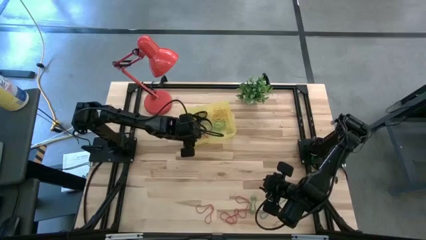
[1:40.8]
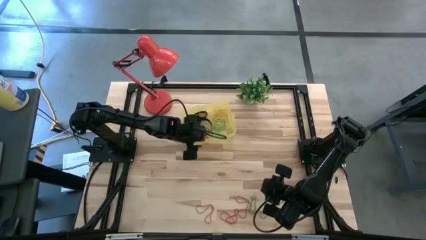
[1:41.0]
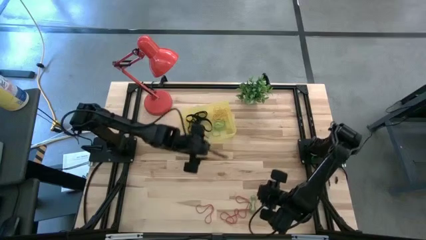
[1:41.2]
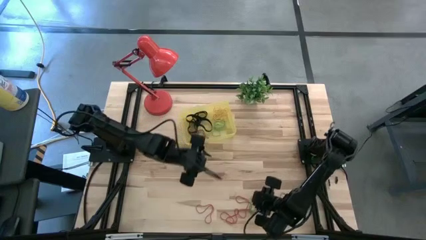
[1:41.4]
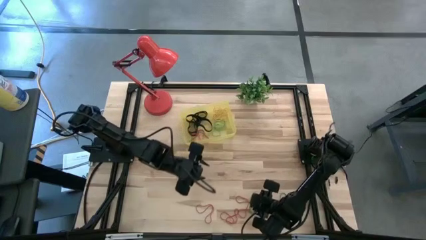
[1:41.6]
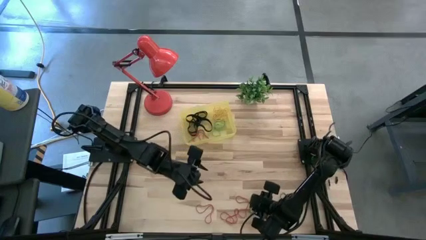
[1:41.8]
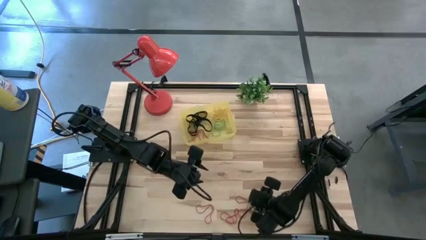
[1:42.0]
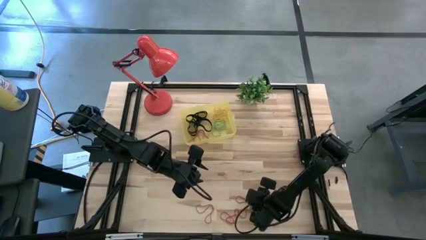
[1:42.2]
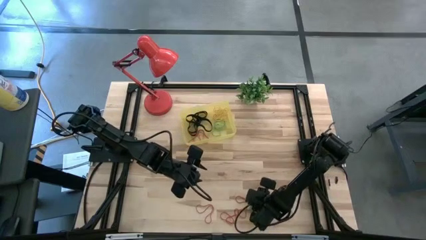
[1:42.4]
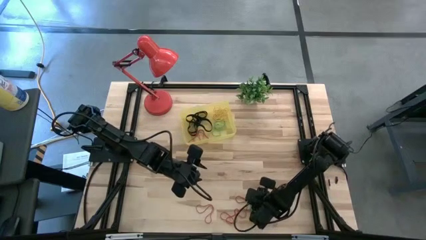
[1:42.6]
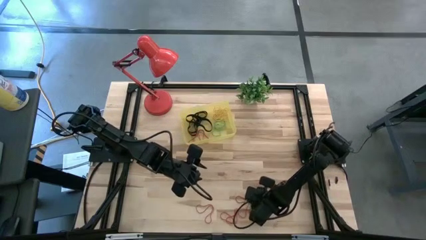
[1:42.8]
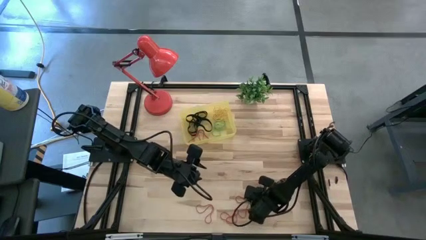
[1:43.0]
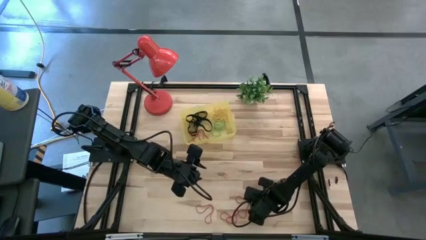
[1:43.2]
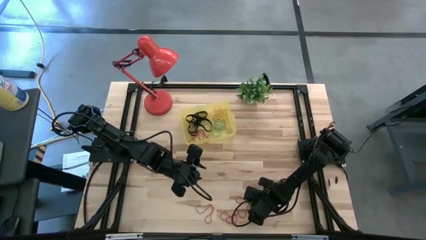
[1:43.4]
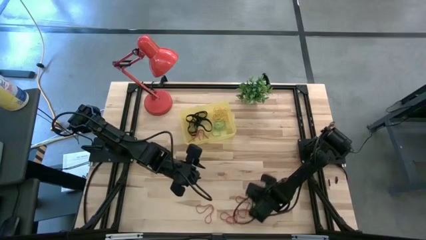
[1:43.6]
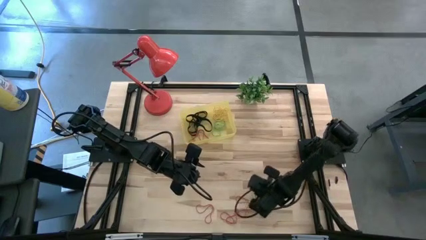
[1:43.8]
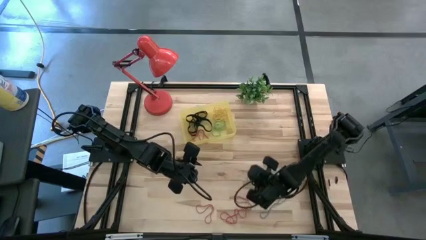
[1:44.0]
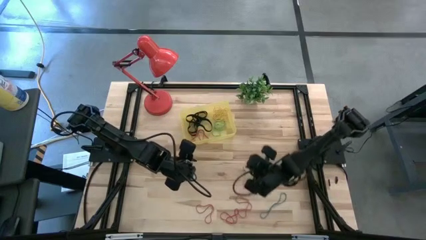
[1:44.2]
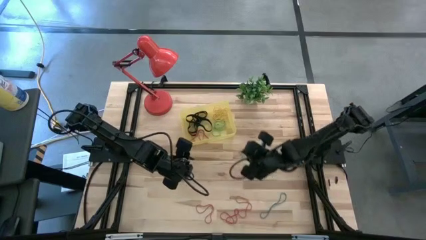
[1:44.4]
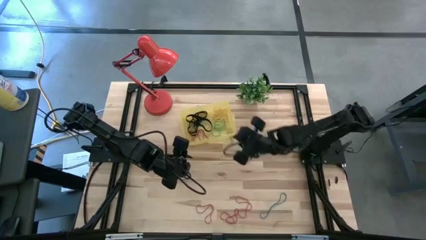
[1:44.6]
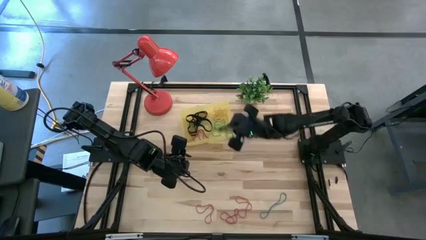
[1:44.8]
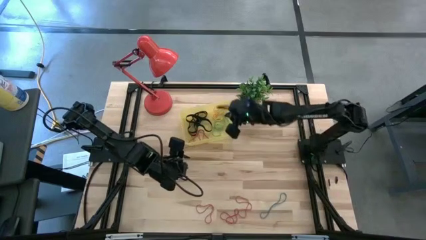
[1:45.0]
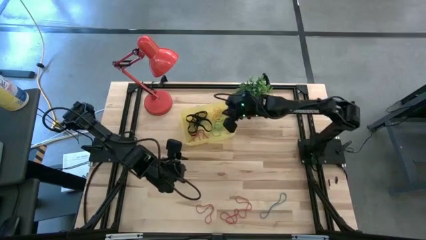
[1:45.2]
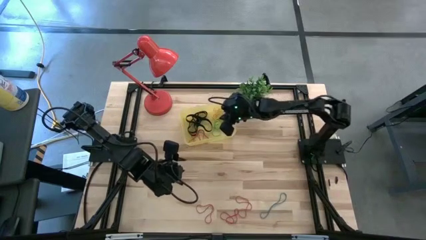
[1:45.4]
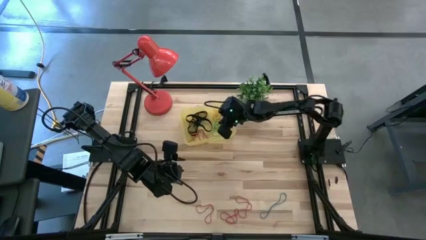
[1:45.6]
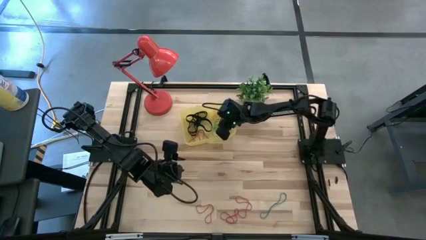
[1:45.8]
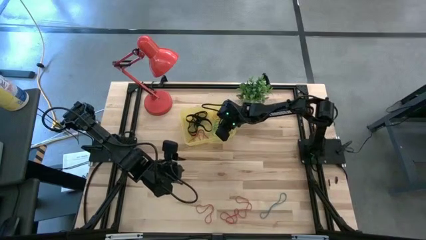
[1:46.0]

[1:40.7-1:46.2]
Task: Pick and place rubber bands into bin
Put the green rubber band into the yellow bin

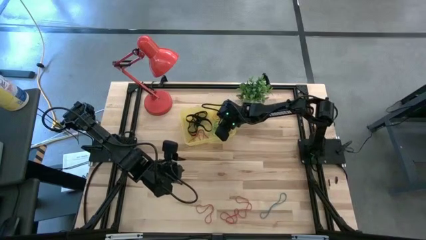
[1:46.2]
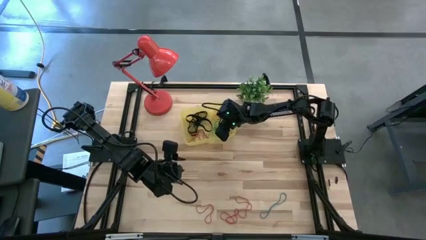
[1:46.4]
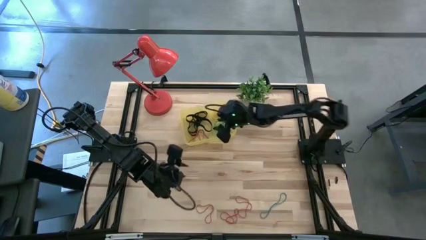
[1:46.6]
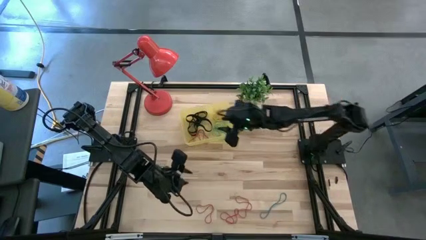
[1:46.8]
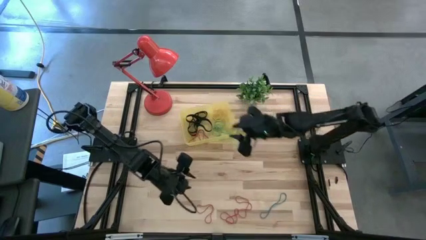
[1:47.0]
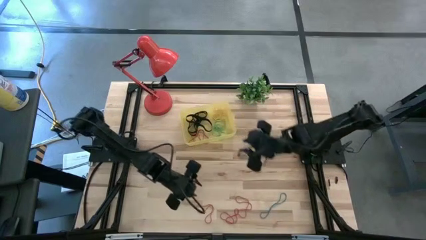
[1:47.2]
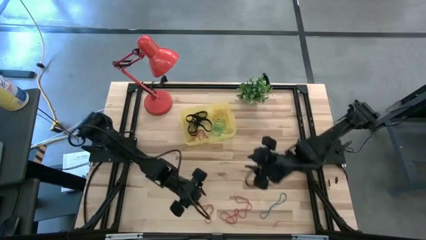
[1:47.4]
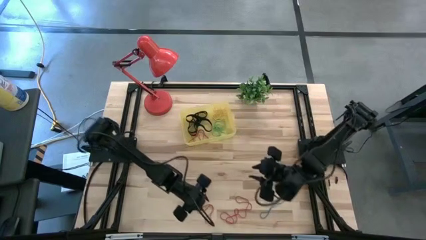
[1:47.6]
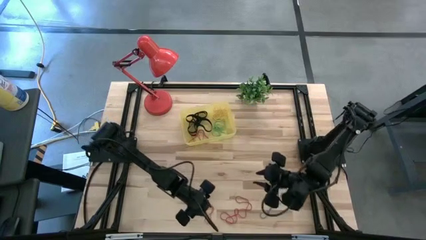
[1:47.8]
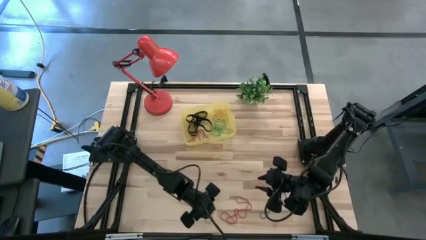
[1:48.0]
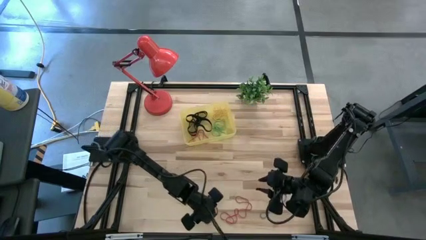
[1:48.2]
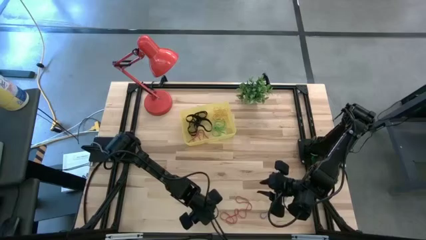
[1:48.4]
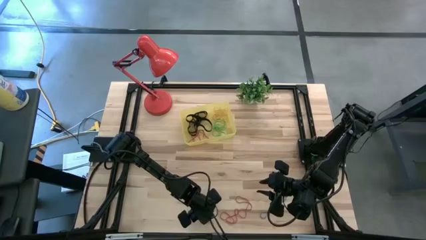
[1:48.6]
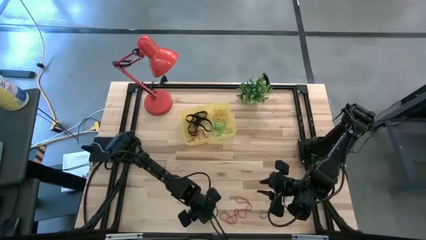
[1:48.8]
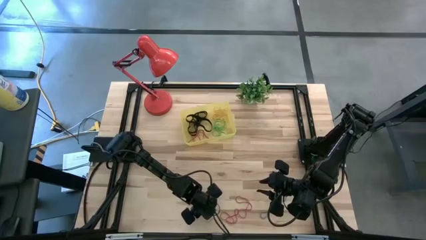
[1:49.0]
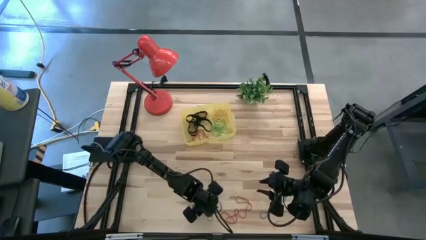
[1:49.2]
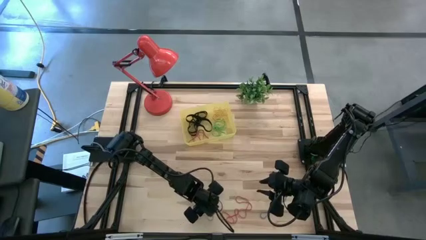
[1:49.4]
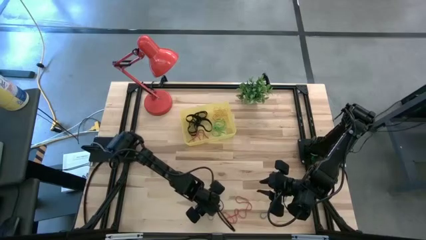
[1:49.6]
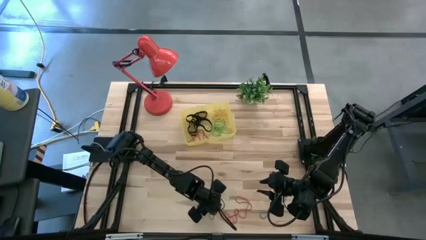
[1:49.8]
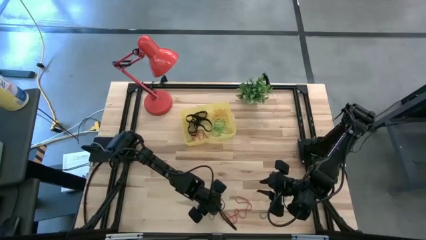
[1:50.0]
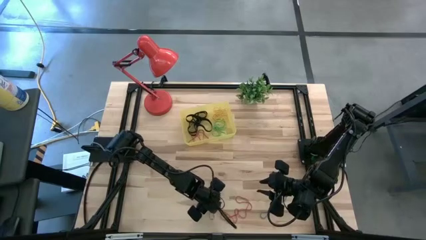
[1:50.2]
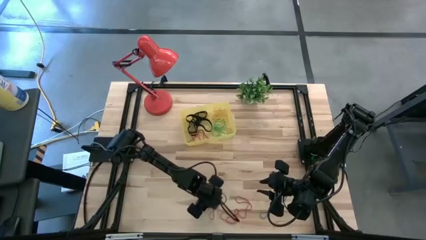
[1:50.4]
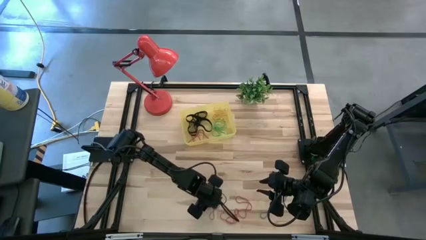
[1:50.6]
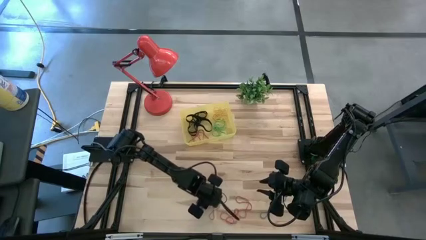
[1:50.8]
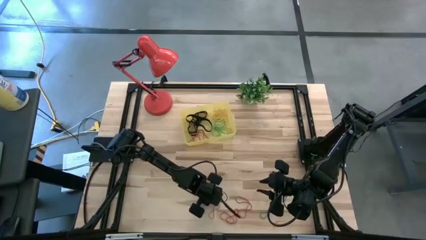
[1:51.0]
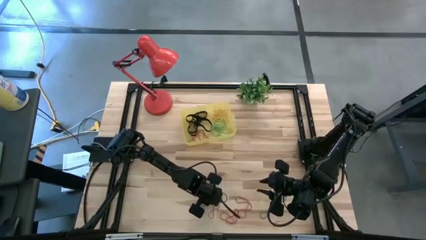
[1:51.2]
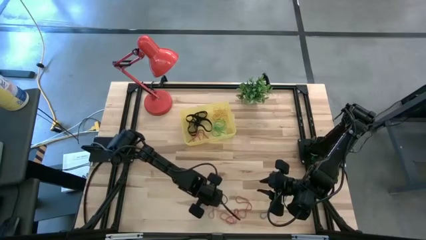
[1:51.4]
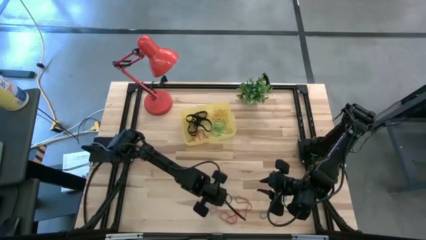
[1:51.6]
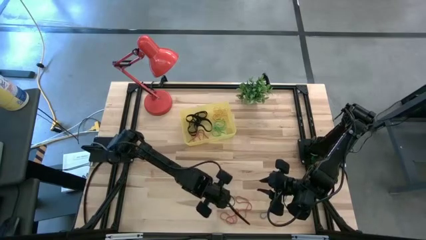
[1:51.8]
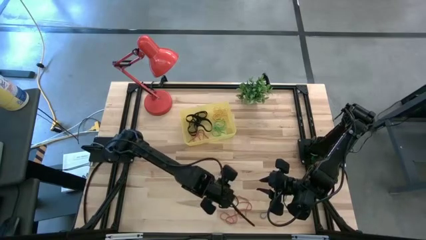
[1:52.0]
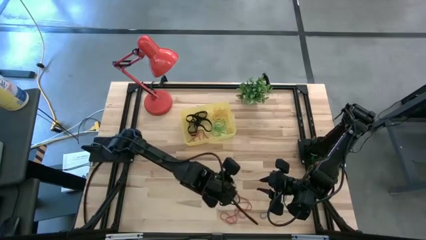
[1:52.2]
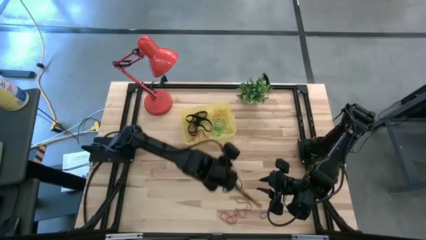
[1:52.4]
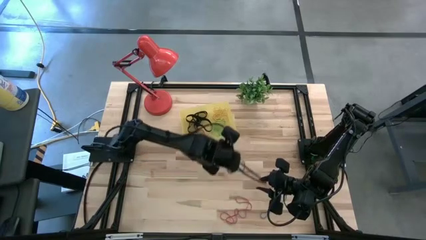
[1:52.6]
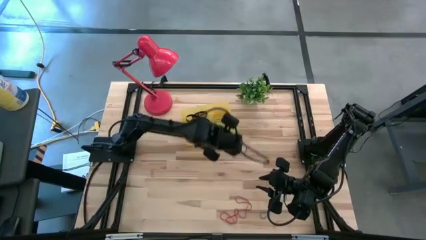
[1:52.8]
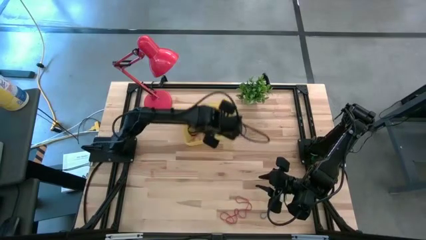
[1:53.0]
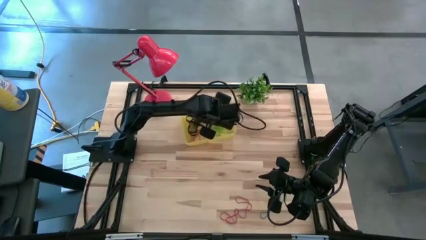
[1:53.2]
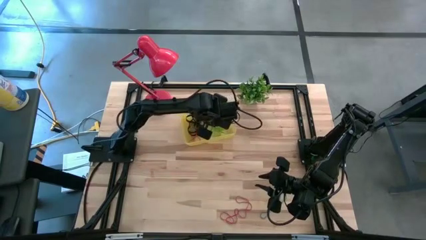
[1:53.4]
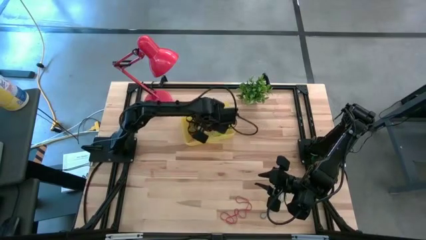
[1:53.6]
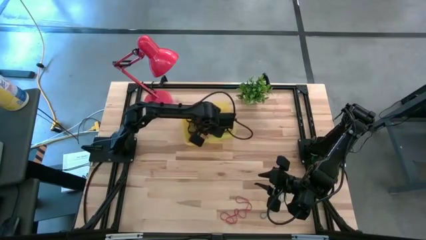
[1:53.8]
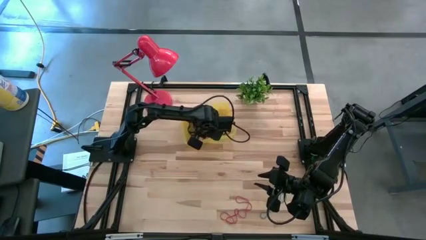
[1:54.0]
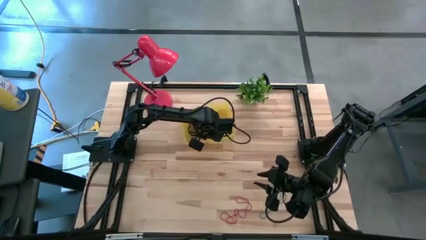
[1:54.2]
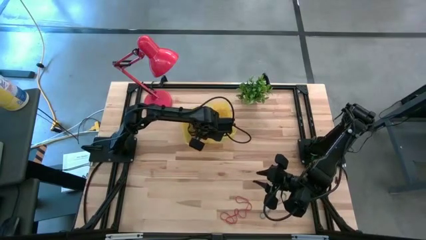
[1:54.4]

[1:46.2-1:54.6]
Put the red rubber band into the yellow bin

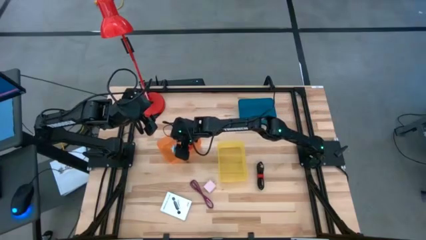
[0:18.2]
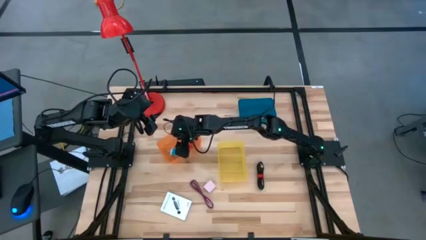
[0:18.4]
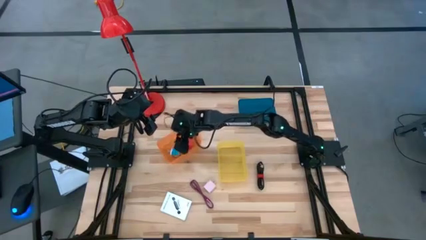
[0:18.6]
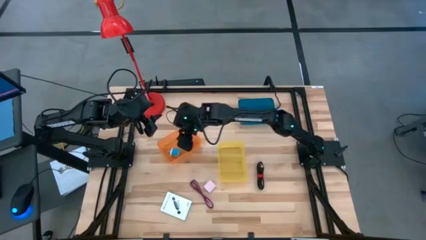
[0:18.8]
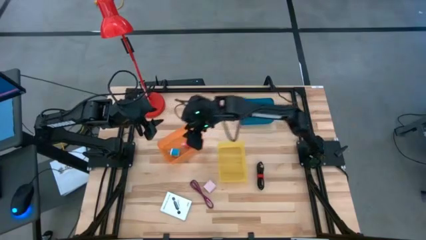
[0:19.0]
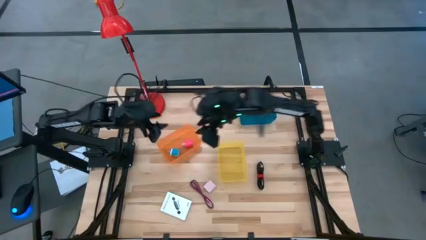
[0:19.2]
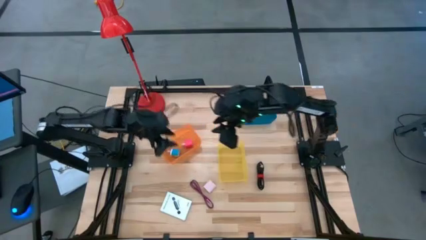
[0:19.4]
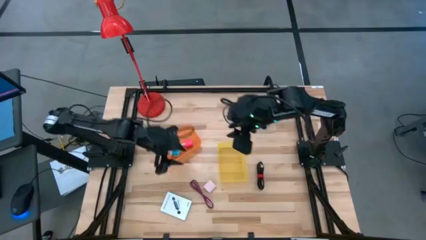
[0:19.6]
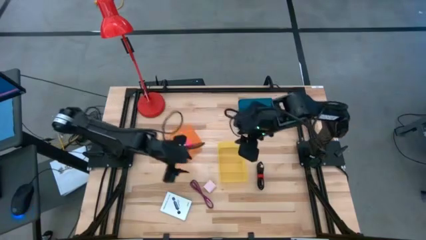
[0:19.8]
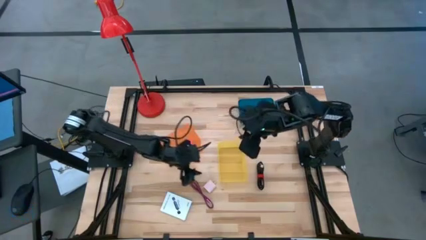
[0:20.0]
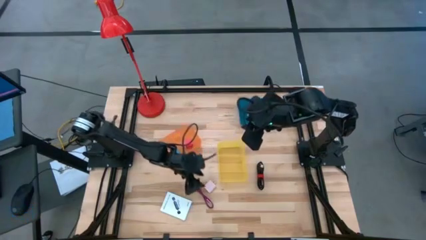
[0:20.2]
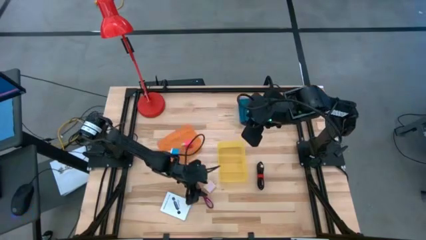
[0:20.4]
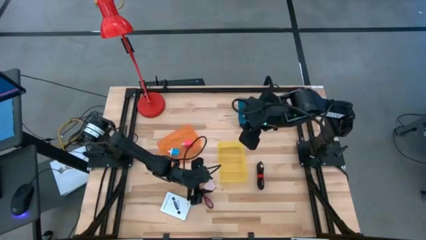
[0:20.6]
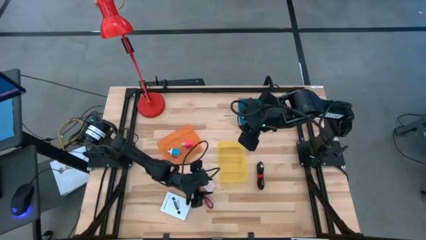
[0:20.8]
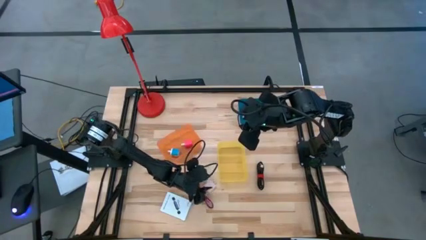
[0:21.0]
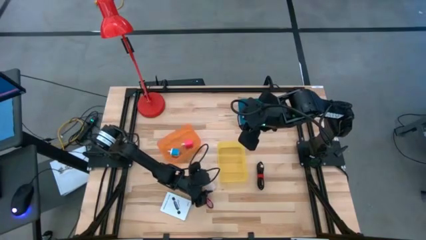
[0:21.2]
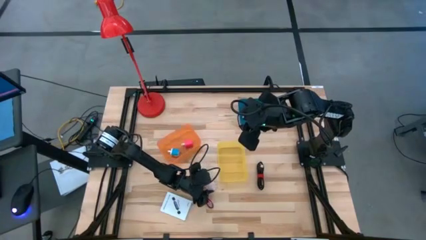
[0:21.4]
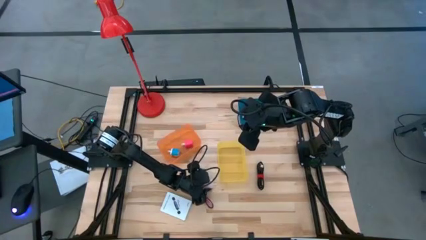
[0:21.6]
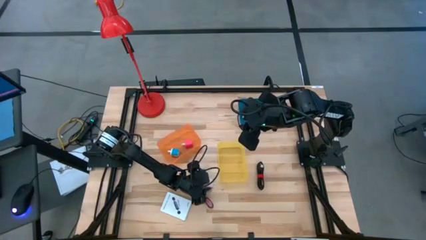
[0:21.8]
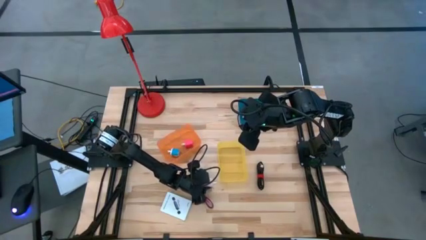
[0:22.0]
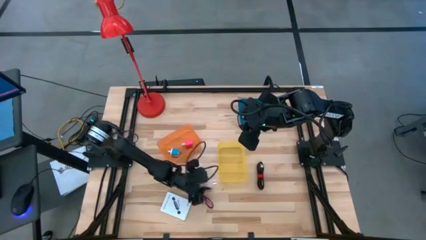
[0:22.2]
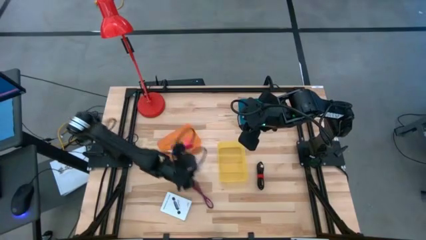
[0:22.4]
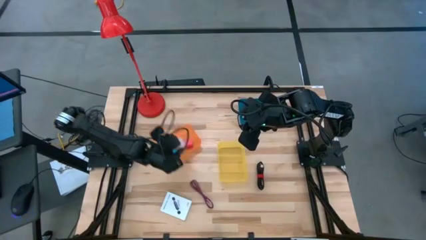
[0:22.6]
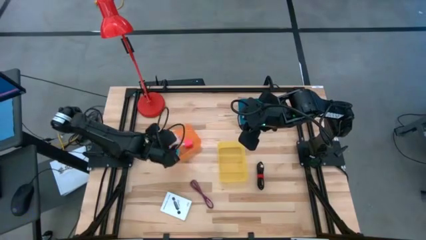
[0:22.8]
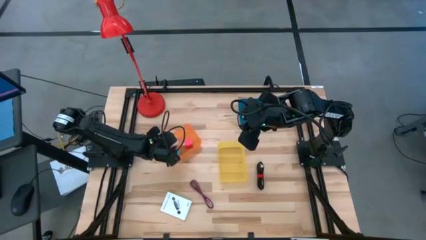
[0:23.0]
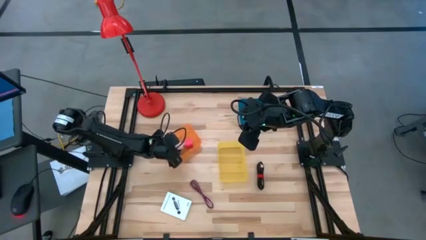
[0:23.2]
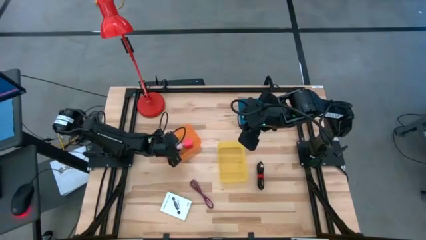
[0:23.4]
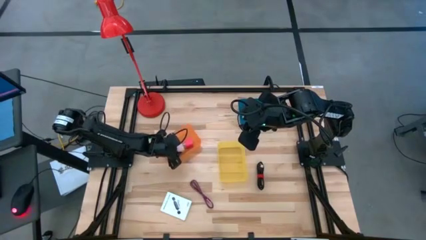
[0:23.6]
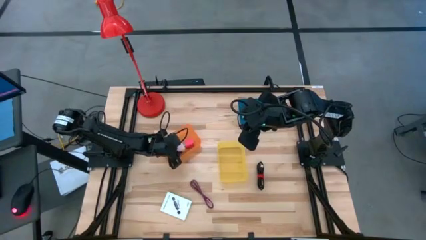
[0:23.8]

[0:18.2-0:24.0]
Task: Pick and place items into bin
Put the light pink charger adapter into the orange bin
